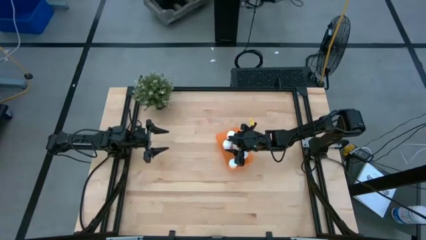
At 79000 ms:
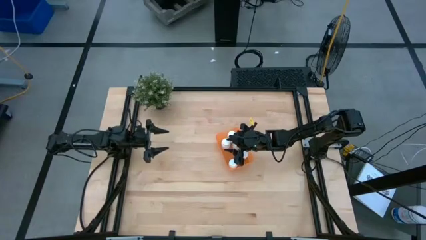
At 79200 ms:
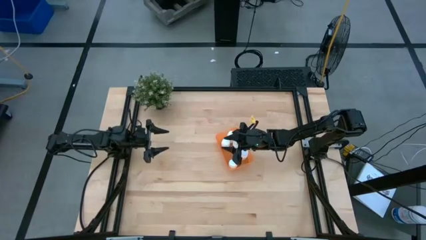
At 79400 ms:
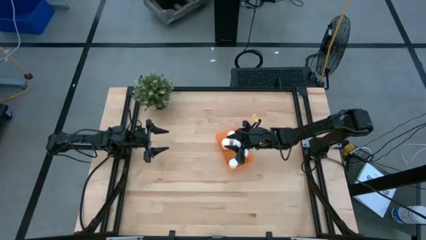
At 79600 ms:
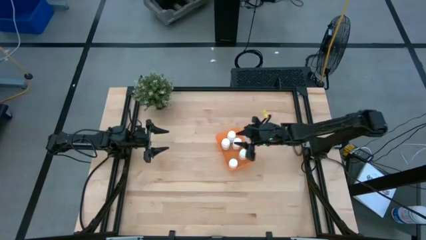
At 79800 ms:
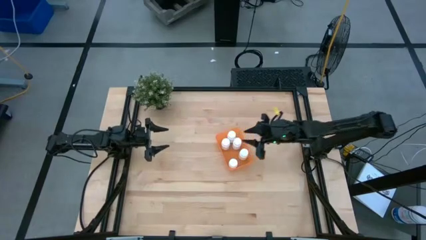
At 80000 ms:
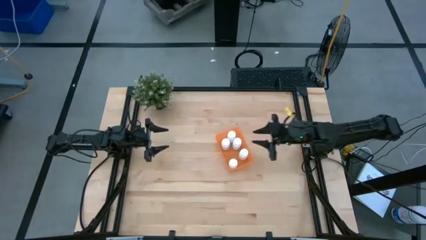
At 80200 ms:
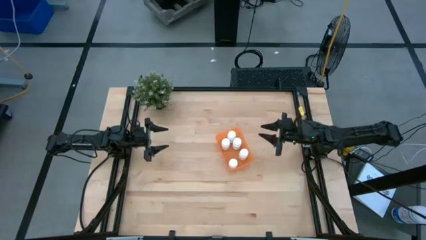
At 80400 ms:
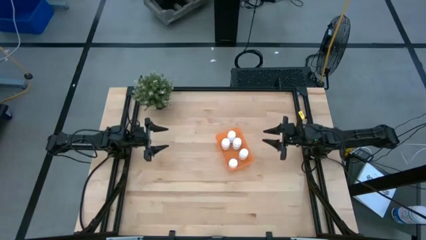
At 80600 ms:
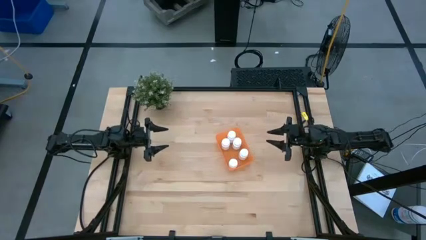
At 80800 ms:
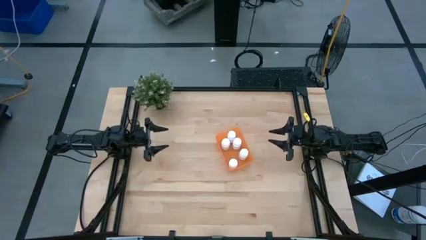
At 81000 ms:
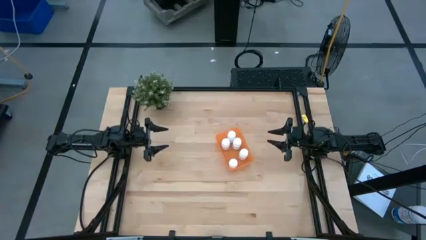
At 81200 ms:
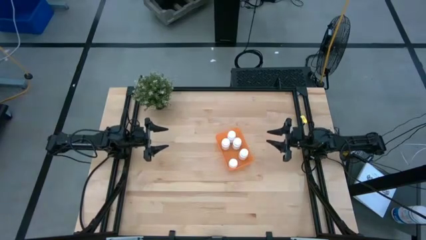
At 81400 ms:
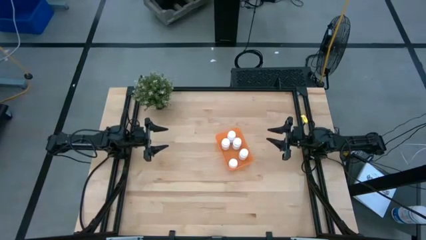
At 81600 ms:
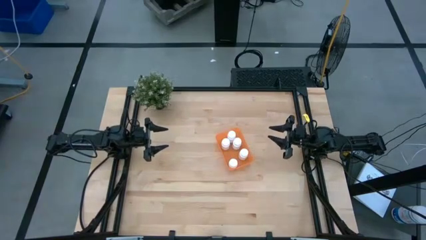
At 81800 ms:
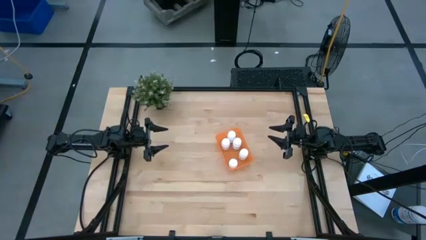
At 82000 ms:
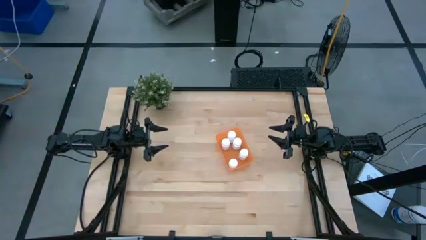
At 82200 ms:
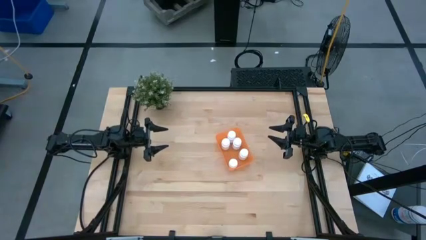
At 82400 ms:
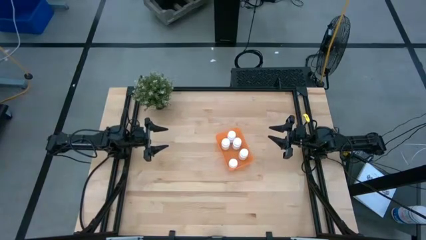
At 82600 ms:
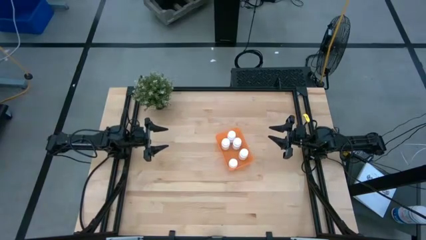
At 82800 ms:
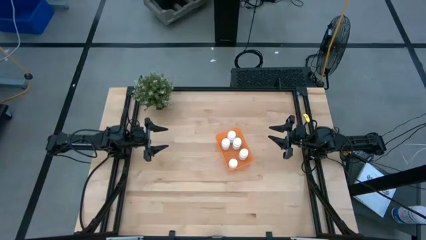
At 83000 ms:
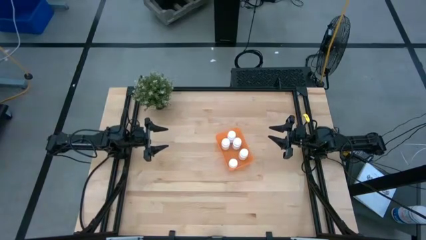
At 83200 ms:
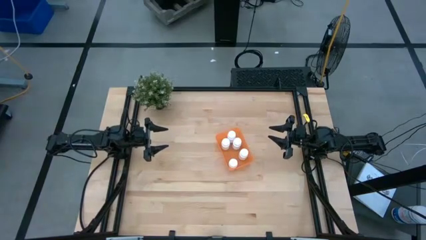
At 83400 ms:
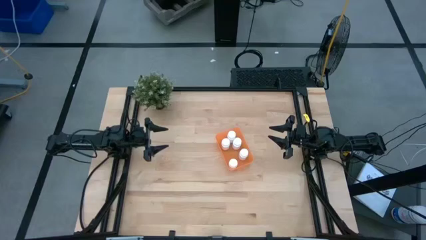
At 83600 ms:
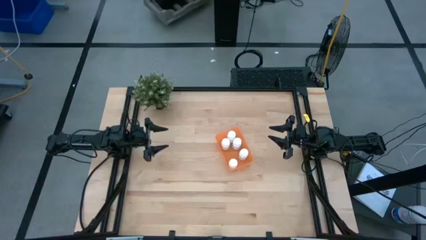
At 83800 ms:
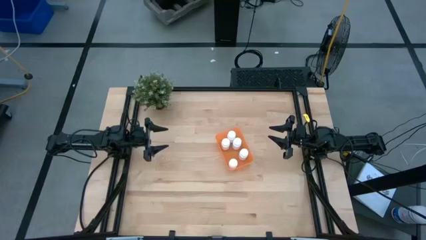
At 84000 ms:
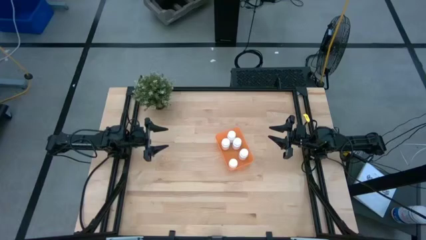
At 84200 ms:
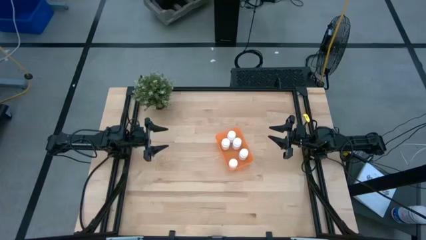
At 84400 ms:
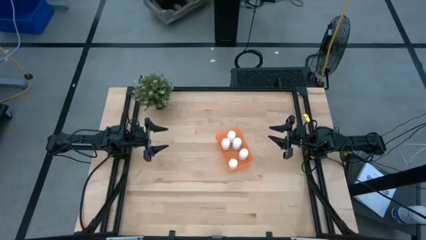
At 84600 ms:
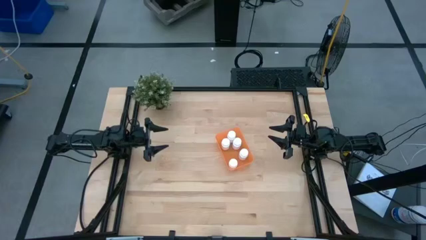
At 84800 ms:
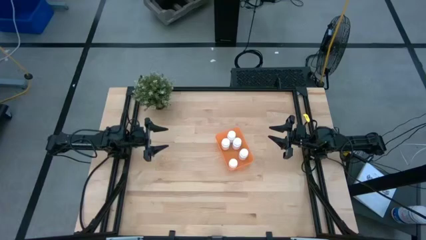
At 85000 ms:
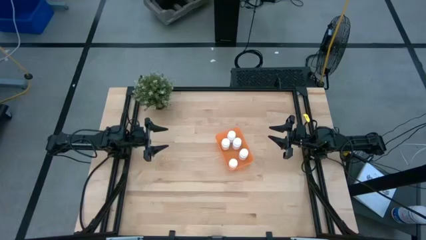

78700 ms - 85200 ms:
Task: Pick and place pill bottles into a basket
Return to Home Position

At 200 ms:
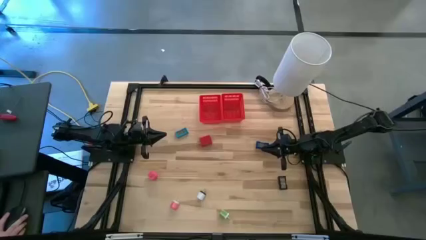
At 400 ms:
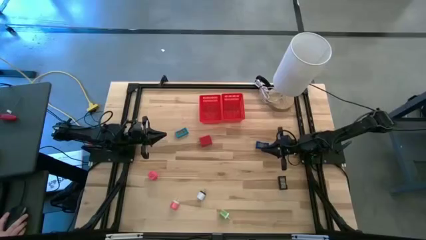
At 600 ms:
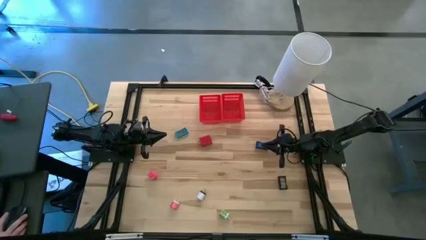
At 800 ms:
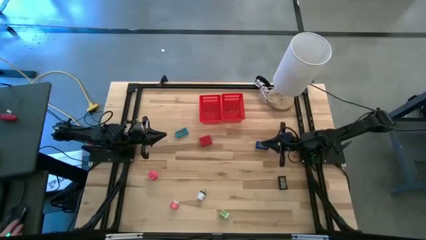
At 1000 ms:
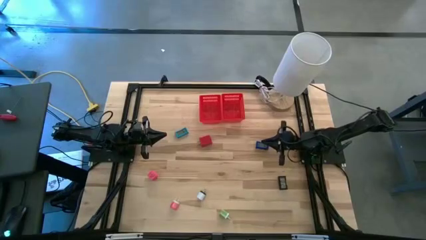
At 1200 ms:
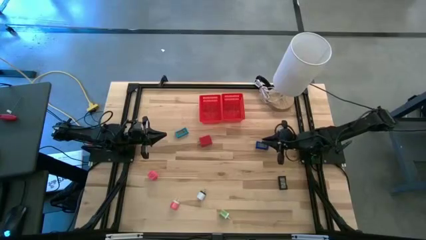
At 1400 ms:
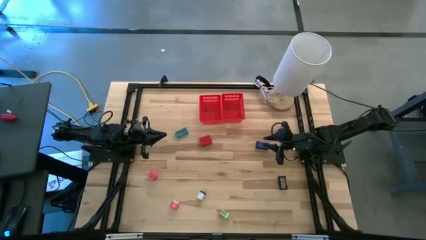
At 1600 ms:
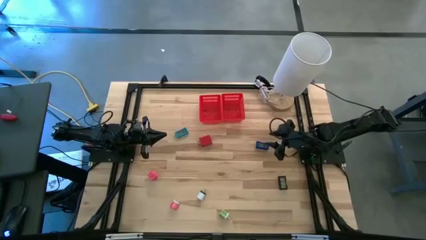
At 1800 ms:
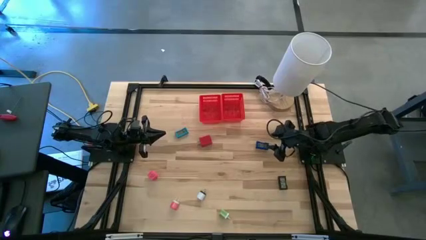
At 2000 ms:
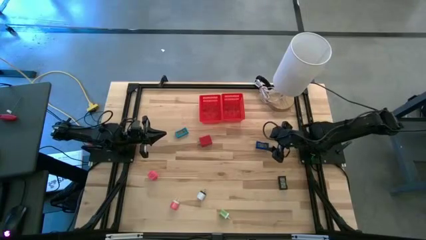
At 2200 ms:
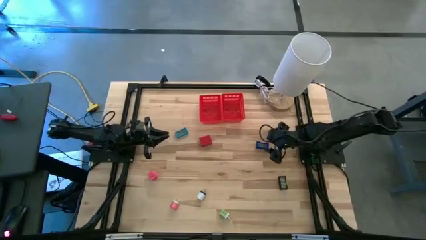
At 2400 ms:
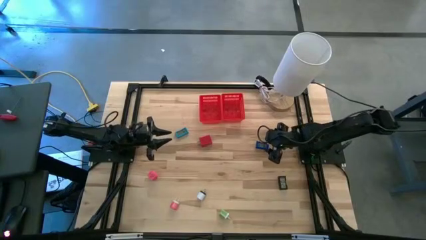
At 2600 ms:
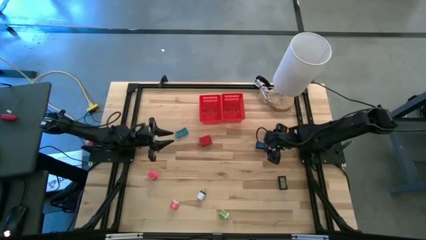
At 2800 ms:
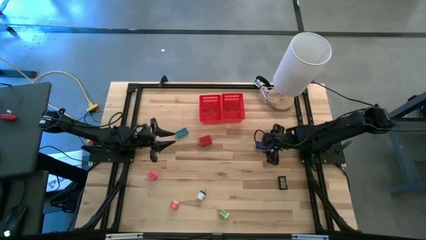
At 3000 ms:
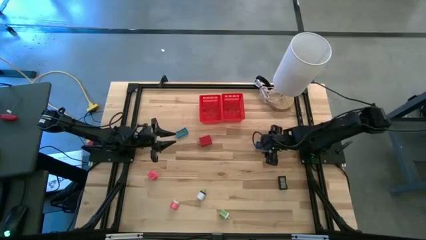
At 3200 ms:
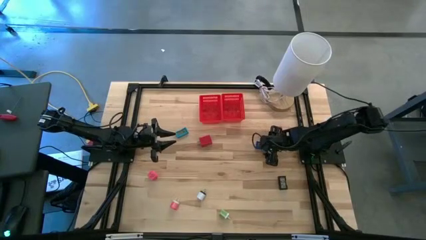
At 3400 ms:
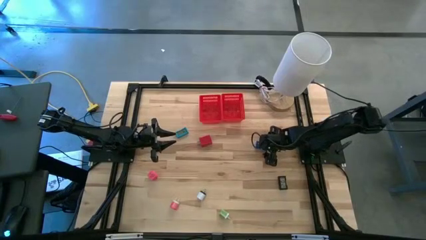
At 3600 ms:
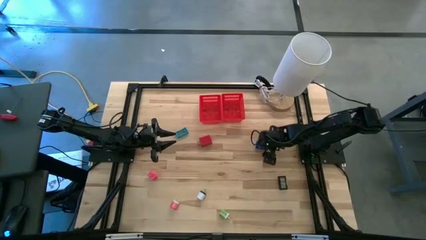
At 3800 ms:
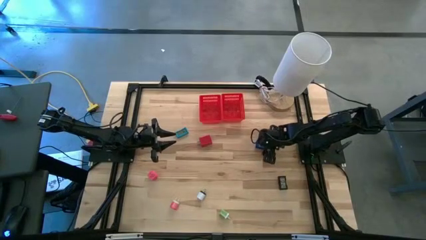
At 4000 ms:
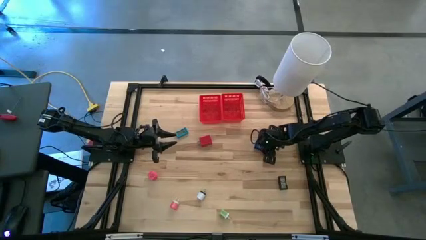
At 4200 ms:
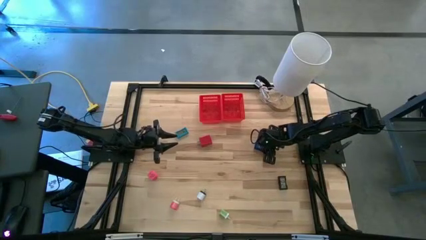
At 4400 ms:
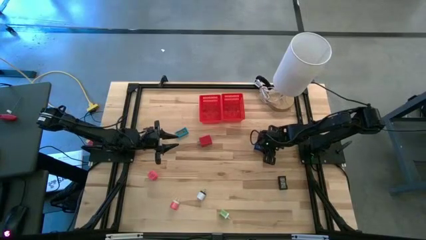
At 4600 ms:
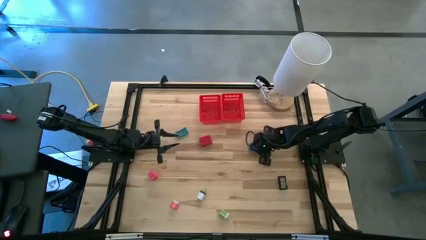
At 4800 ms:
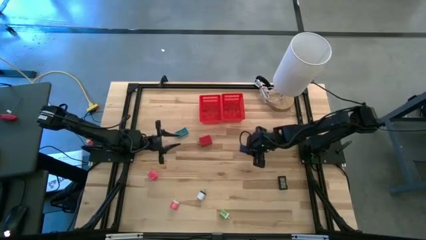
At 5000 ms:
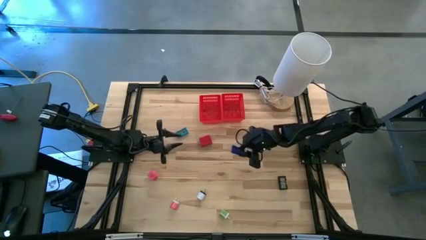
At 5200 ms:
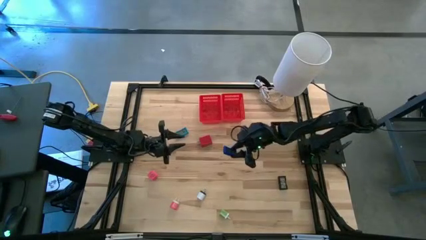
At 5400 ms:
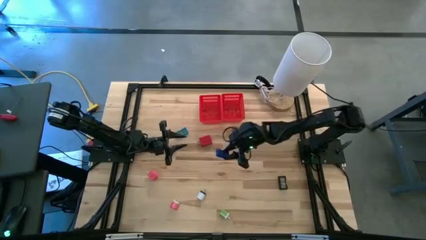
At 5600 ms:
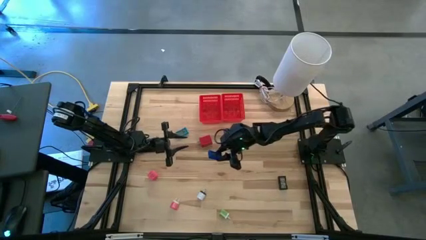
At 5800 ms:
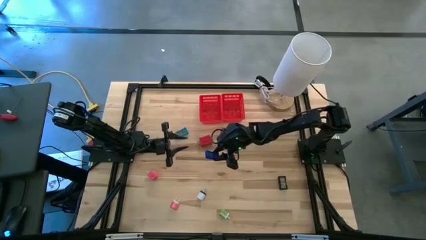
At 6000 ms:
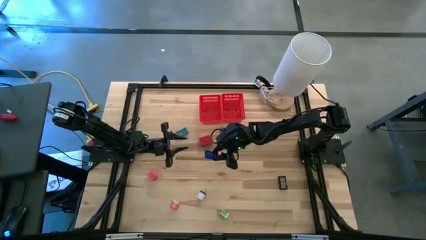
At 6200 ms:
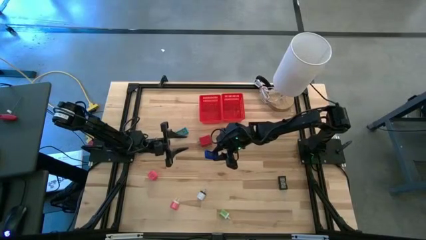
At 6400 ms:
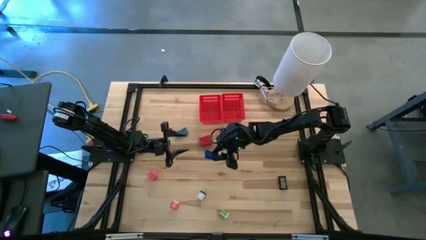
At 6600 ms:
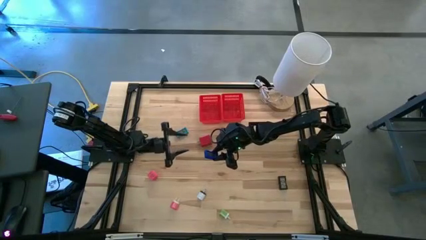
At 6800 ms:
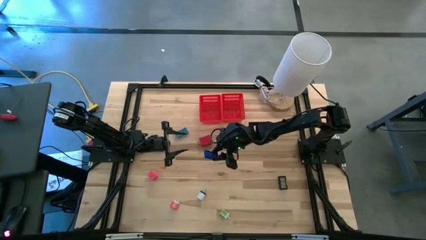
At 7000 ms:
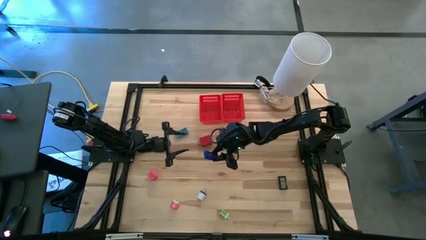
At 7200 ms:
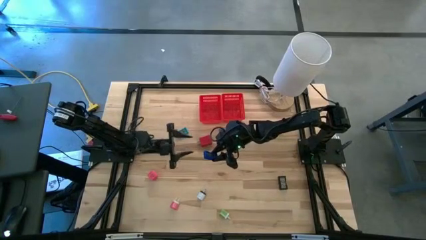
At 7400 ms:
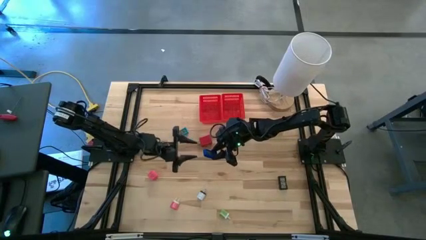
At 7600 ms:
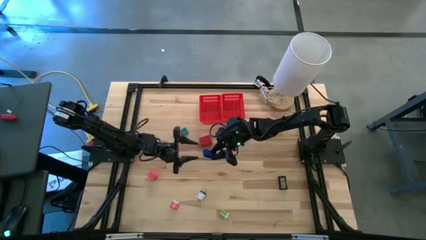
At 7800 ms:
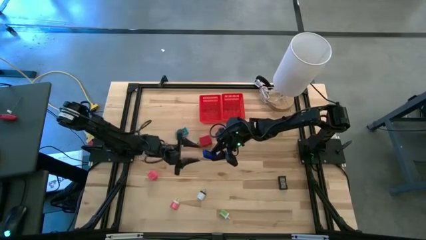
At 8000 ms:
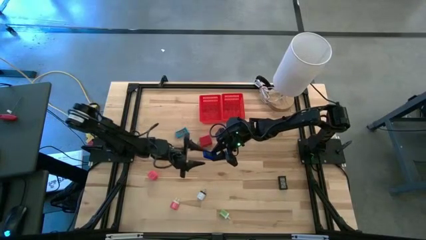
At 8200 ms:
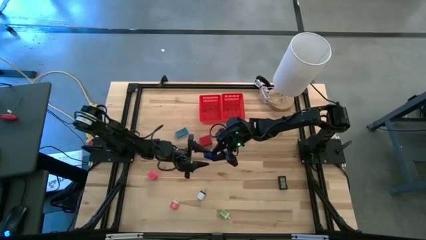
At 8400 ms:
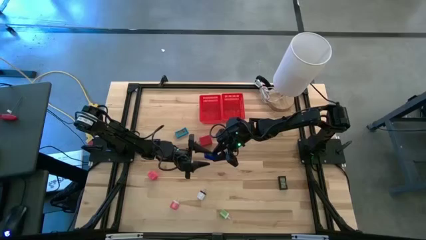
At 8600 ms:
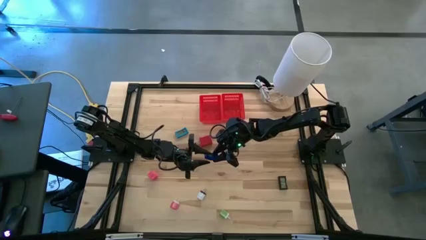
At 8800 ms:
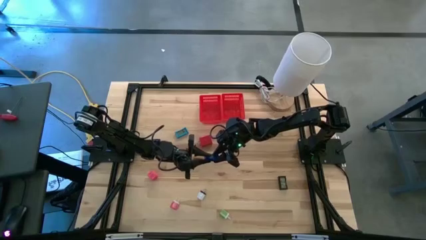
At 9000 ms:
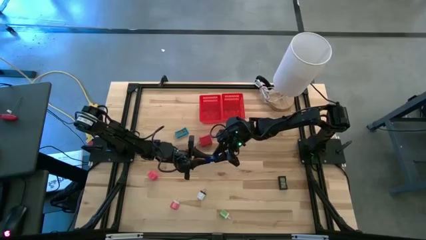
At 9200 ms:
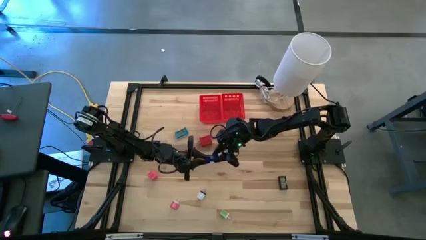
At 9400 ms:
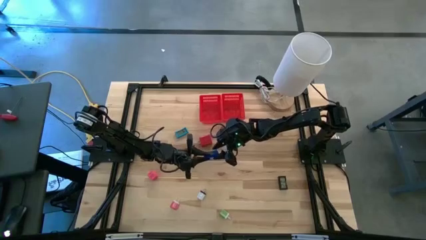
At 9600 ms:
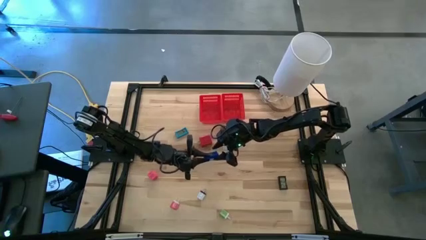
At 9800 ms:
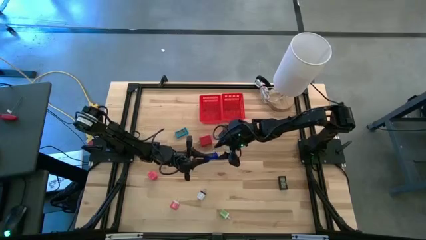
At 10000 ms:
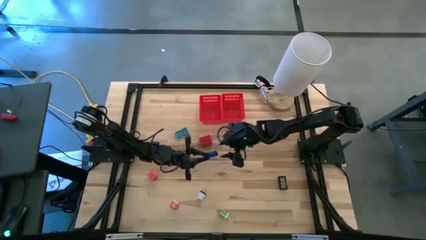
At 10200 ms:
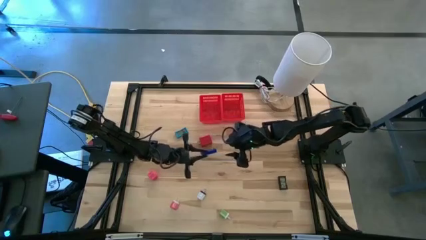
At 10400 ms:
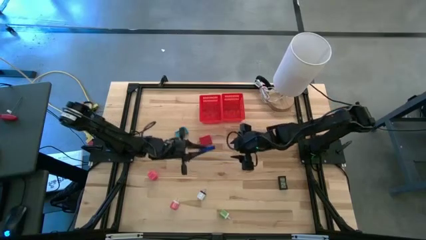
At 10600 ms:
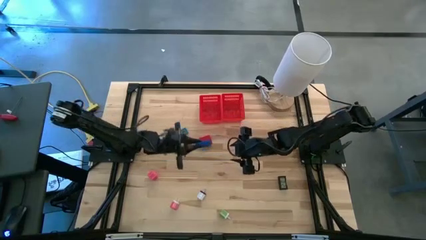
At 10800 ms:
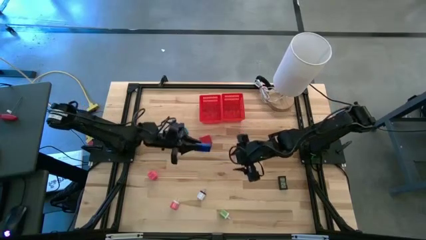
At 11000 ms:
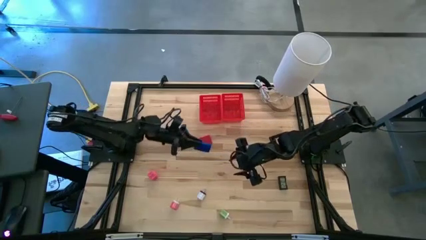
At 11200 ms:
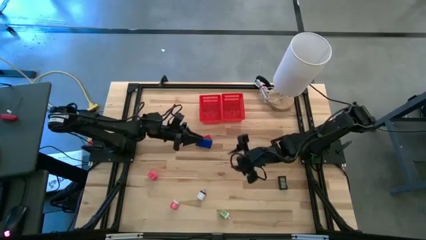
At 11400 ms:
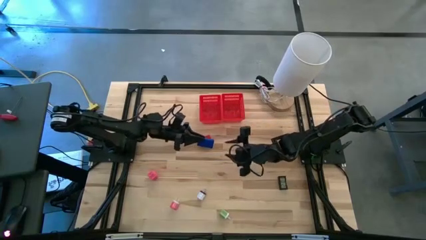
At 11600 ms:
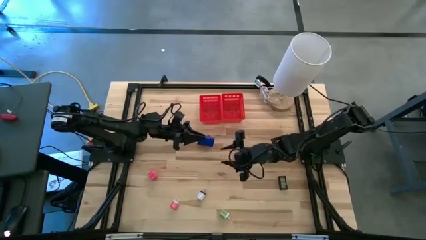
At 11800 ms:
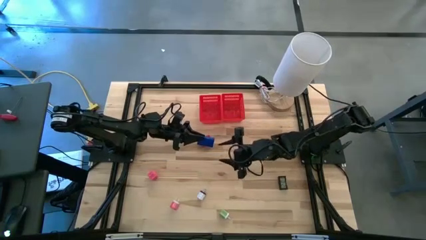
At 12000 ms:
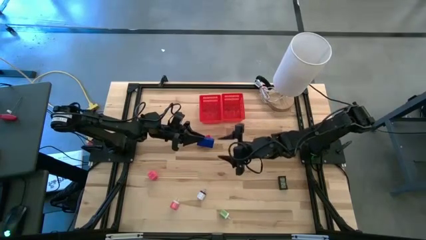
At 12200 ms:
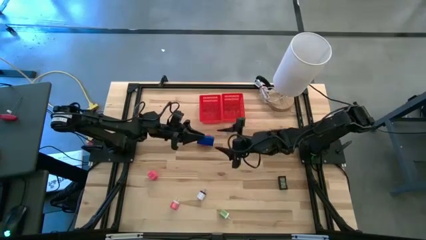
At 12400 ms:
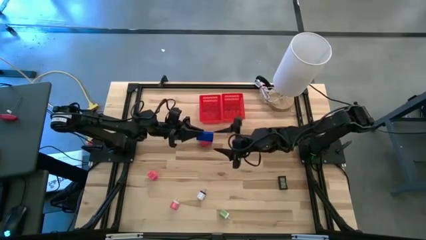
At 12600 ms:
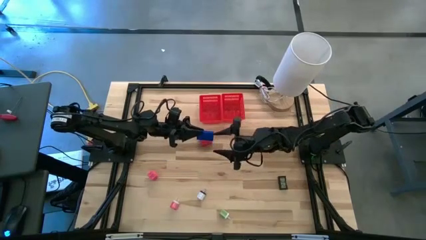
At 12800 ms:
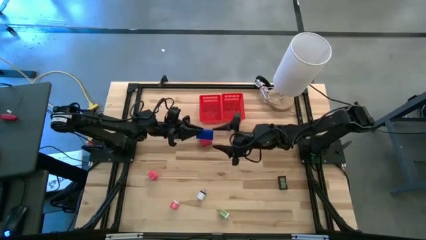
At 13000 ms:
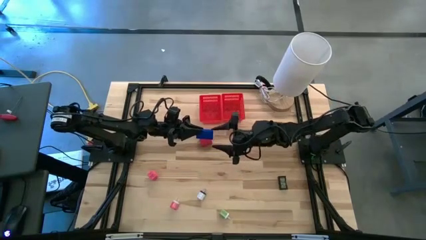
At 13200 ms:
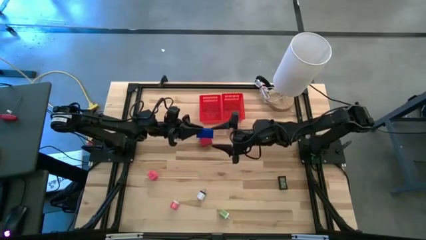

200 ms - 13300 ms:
Task: Pick & Place Office items
Put the blue digital clock into the left red bin
